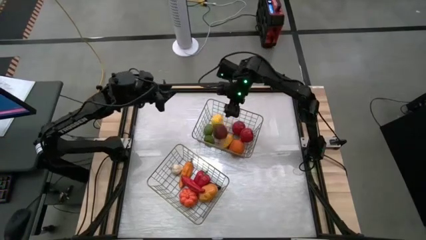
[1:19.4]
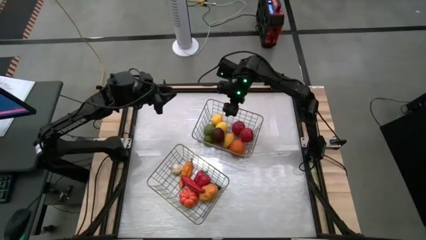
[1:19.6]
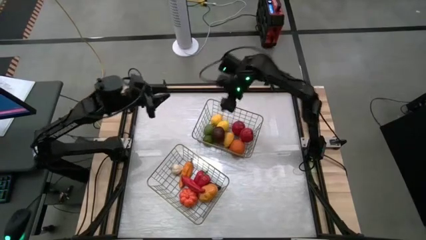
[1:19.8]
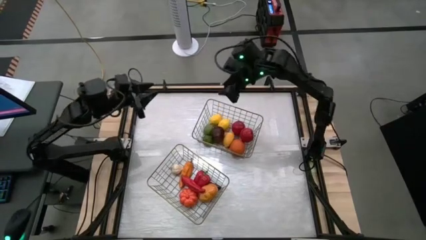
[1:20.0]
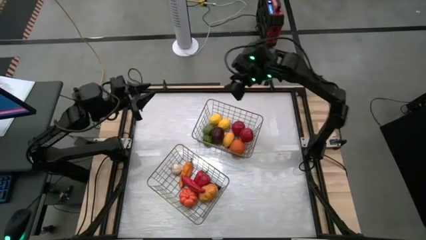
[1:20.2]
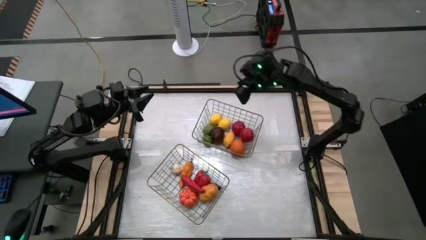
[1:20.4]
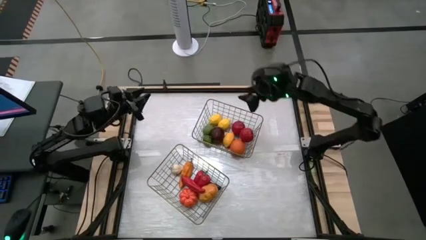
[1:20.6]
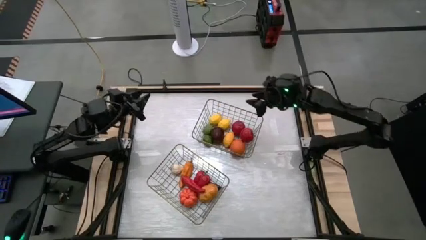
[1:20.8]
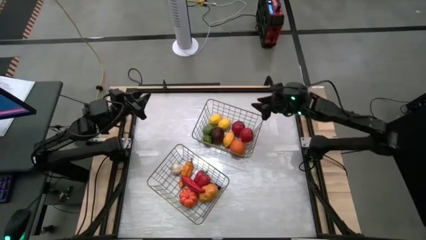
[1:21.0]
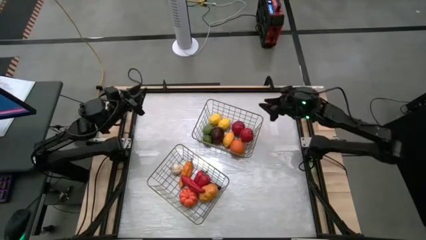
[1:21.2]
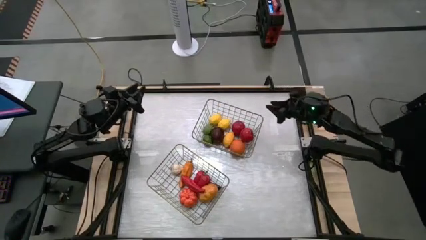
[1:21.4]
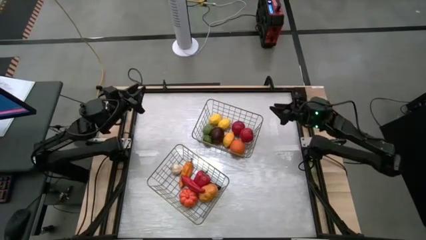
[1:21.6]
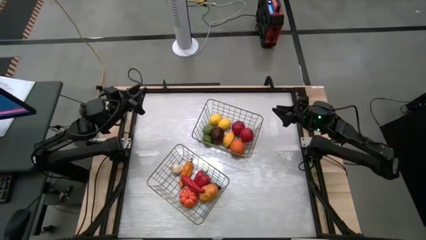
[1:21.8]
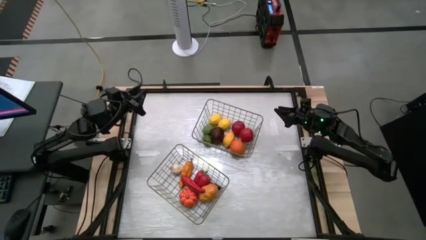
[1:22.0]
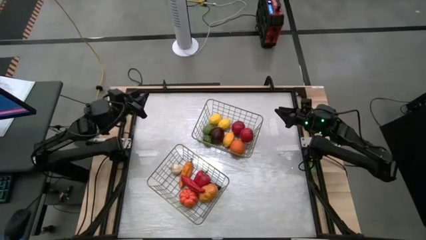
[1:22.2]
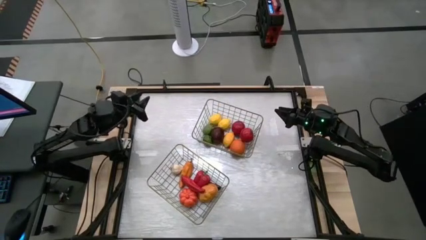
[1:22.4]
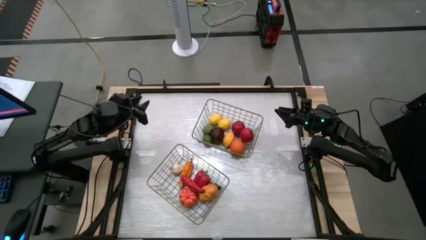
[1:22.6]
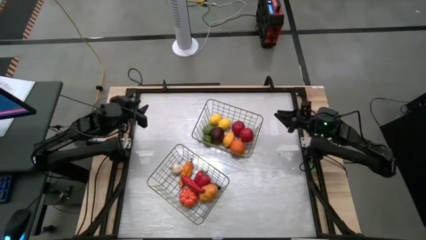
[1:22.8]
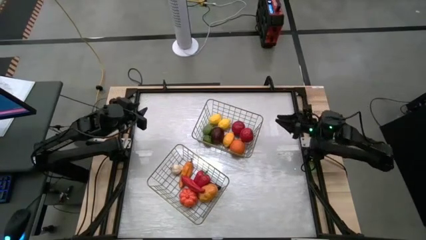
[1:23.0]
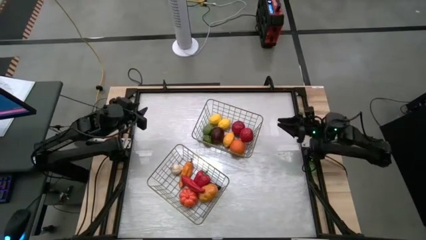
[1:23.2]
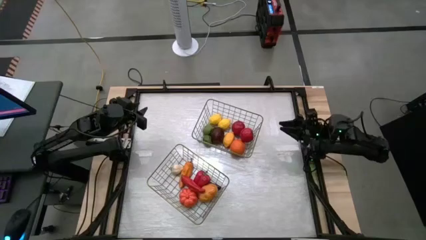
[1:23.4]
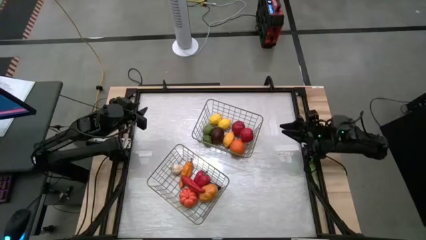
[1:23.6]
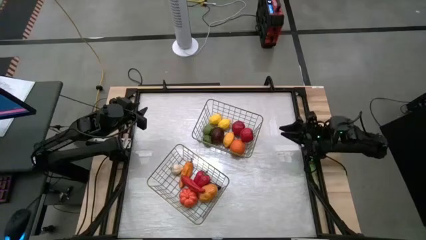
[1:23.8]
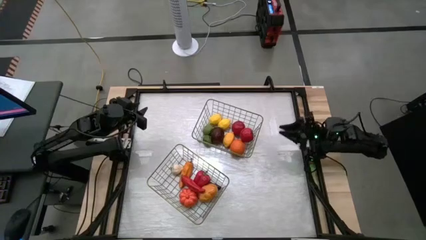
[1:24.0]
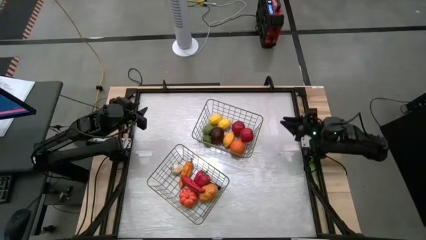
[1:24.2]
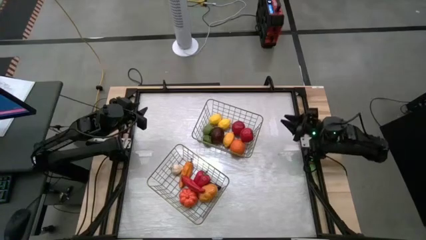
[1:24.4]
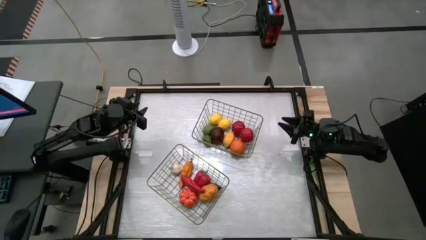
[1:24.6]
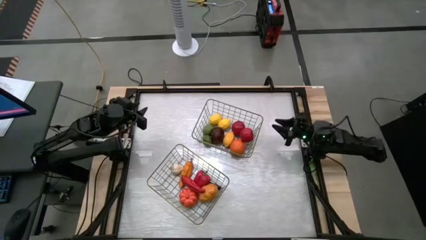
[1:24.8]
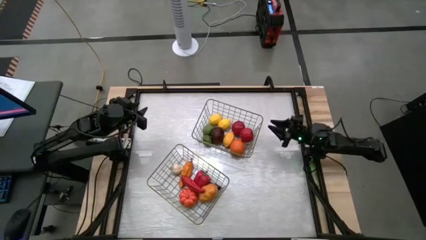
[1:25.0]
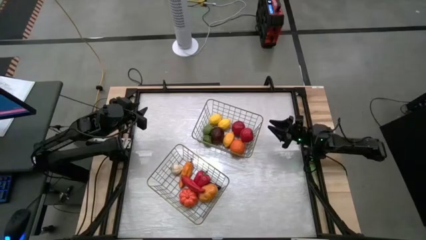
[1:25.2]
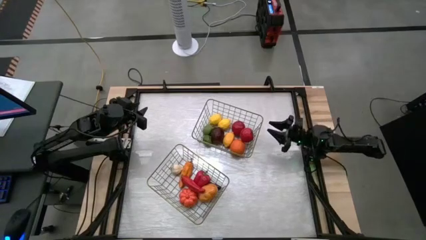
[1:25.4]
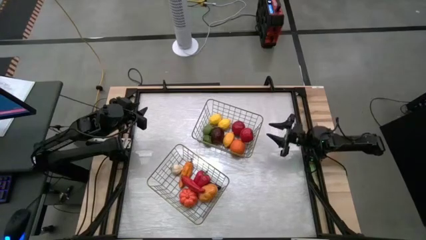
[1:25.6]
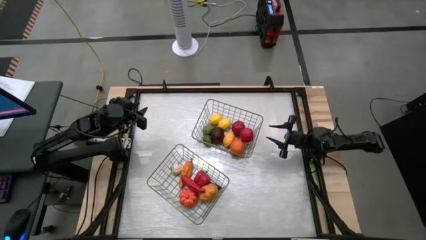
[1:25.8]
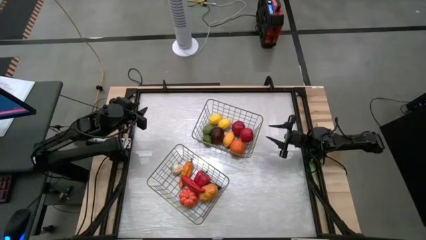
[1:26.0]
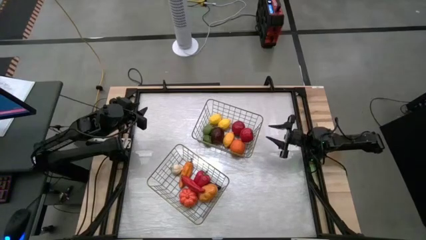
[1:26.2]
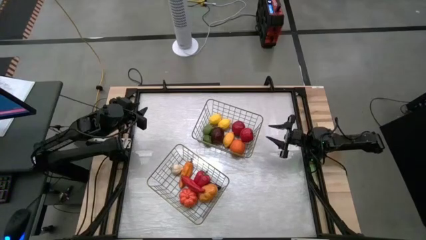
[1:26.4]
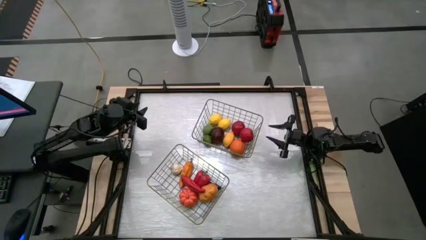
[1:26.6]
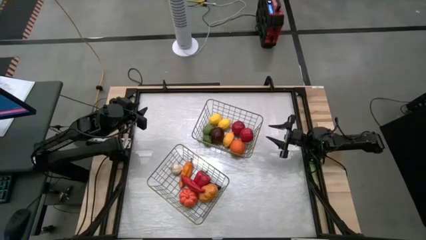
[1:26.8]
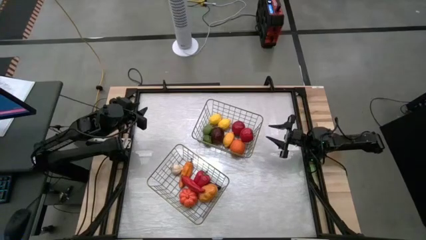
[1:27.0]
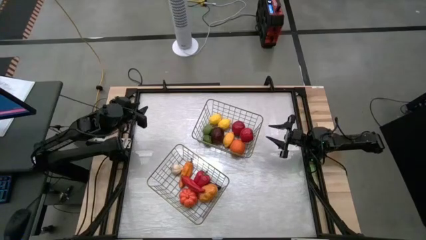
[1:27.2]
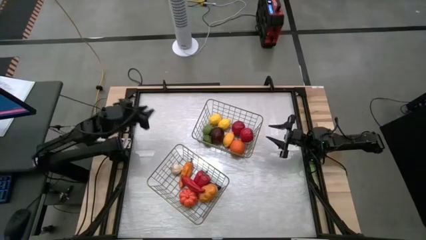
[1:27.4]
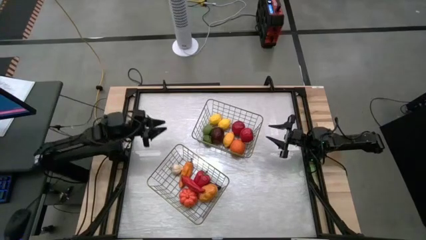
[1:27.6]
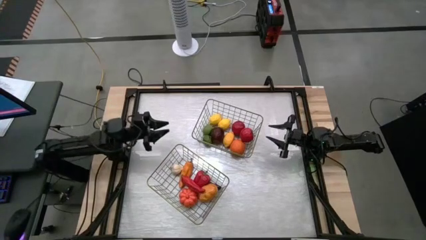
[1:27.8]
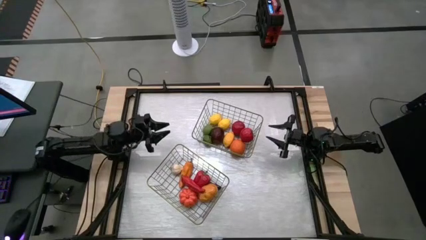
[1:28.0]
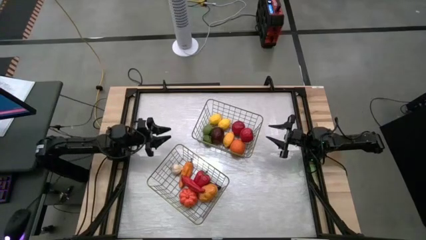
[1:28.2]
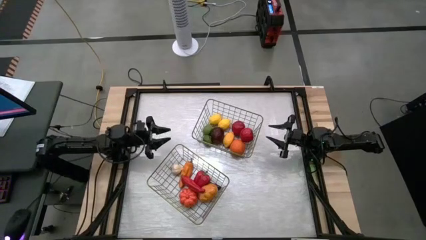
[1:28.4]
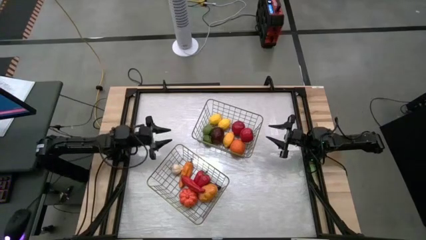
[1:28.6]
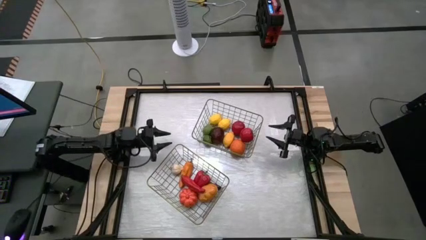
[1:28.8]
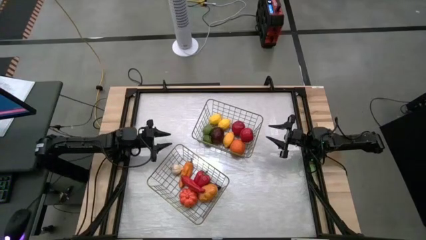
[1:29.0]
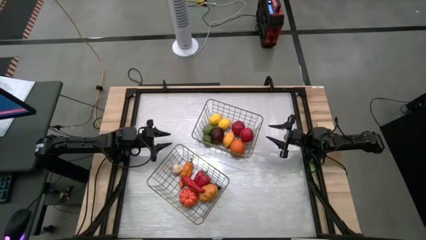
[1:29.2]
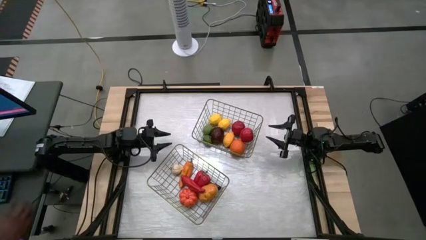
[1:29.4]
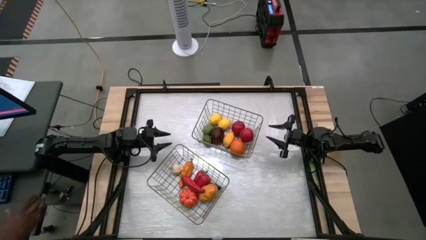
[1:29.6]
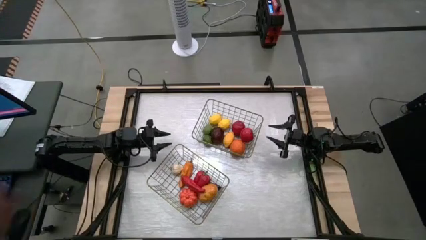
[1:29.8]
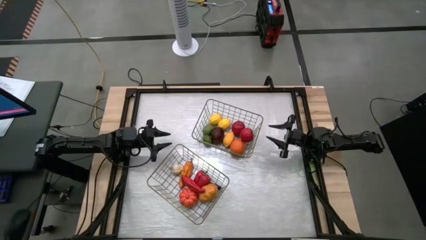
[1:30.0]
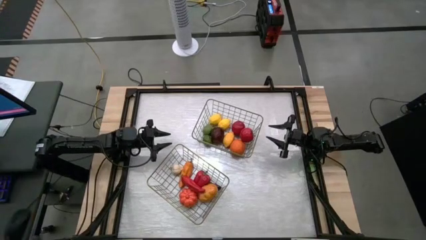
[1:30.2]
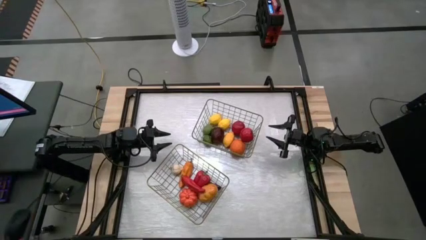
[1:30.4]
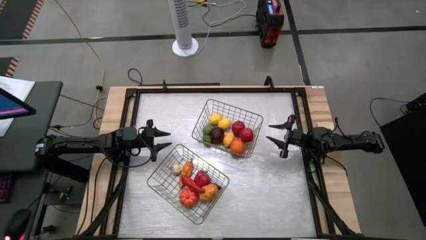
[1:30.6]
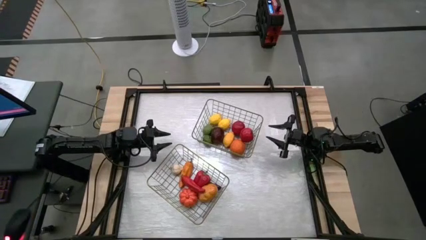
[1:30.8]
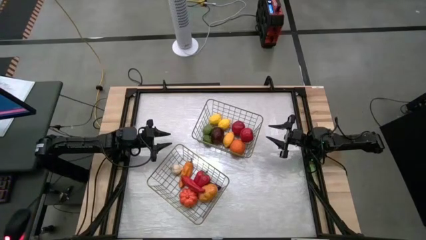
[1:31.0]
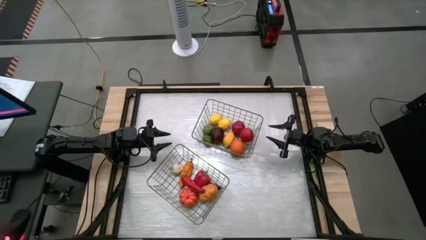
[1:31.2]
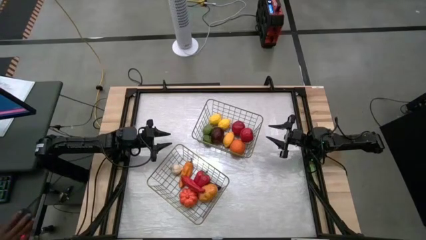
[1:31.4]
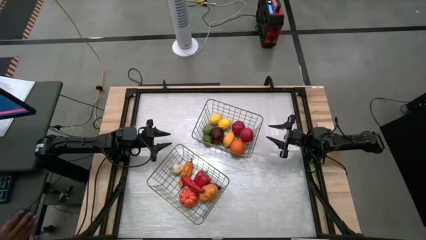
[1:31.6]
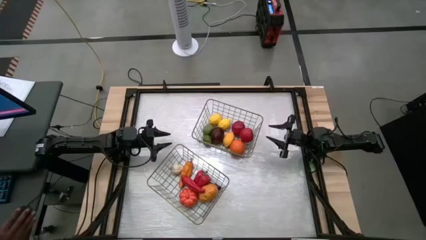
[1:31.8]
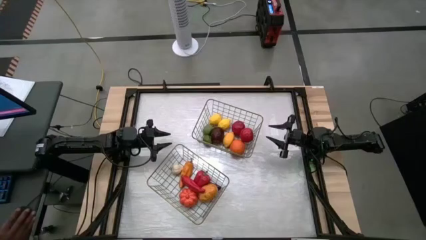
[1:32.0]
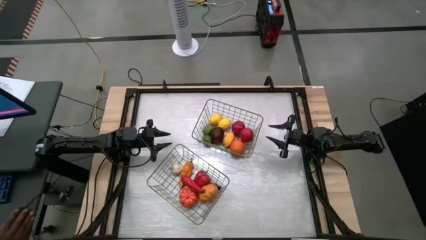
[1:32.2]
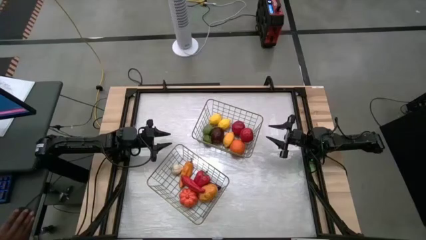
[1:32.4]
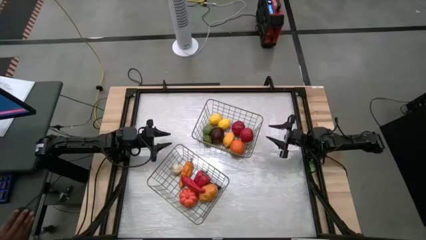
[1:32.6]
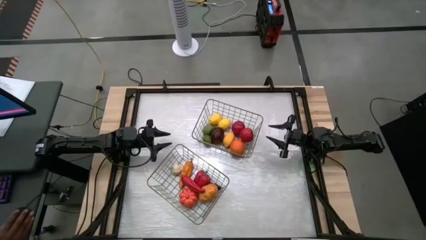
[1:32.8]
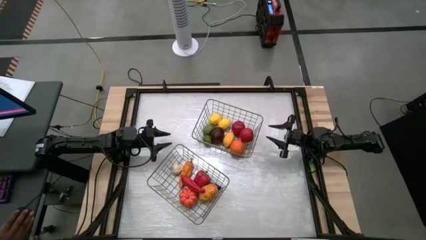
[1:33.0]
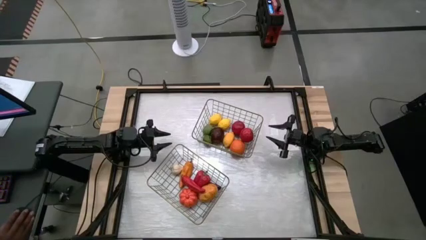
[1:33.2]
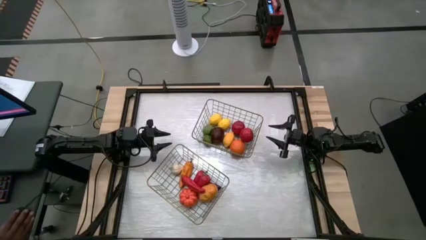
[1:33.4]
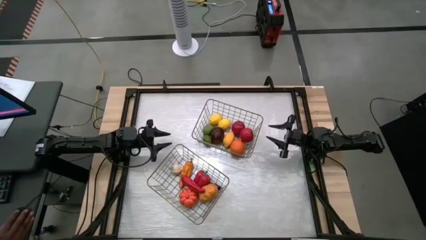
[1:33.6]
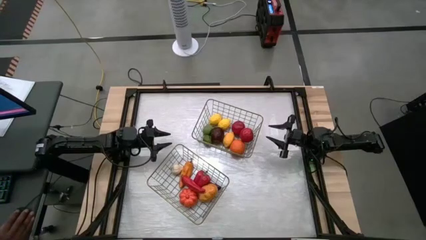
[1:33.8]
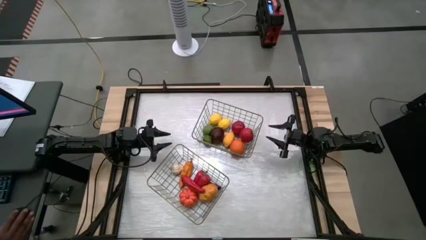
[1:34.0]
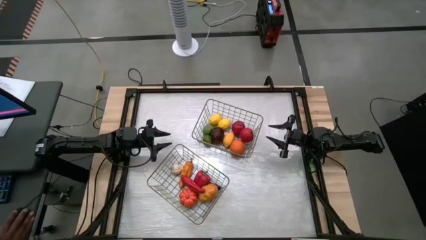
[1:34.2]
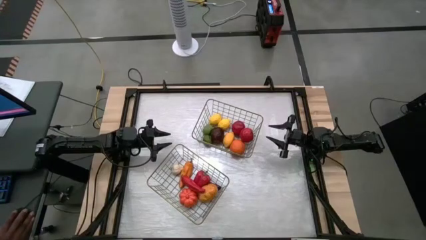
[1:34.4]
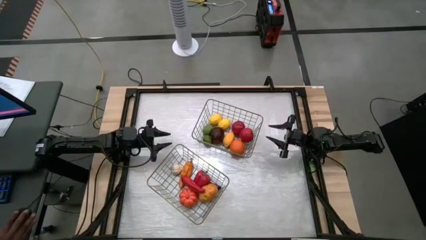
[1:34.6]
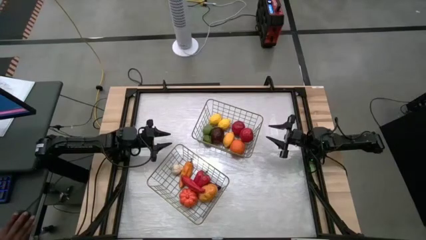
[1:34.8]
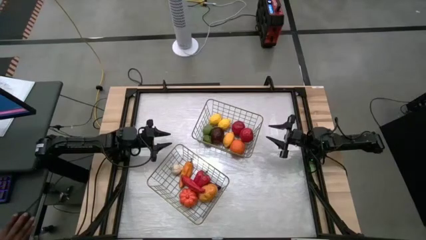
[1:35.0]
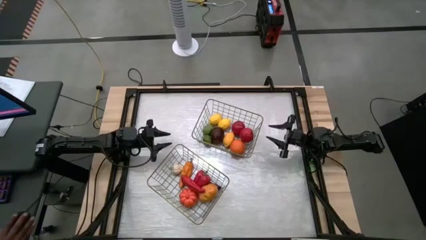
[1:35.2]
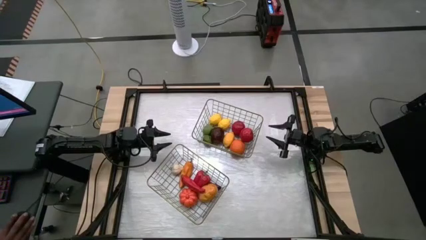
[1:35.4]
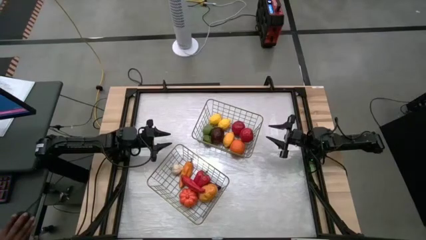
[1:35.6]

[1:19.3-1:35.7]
Task: Sort produce into baskets
Return to Home Position

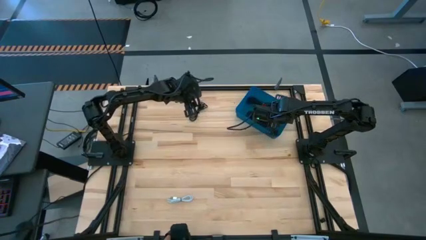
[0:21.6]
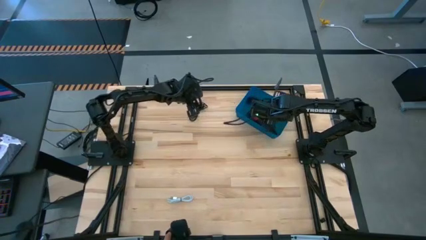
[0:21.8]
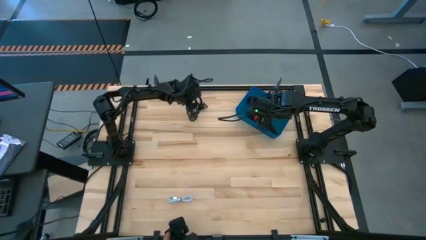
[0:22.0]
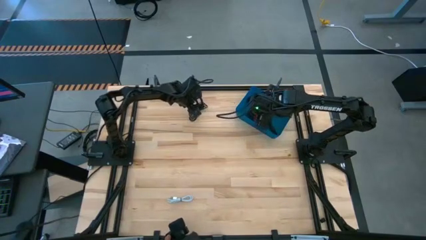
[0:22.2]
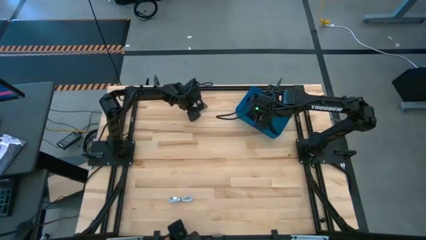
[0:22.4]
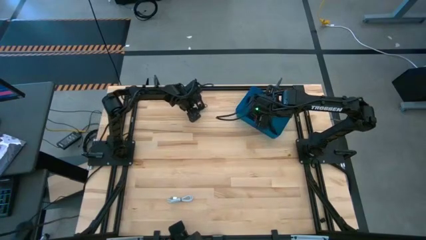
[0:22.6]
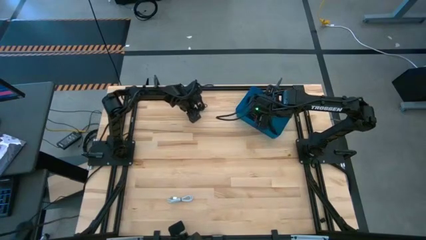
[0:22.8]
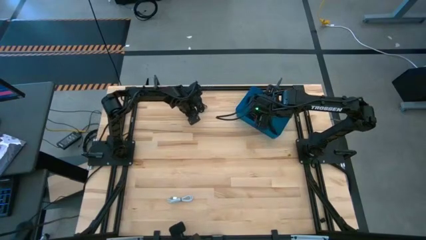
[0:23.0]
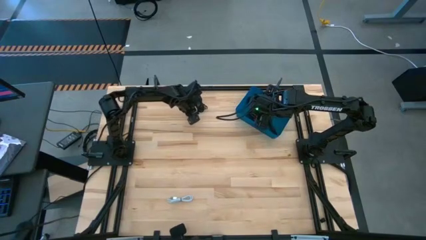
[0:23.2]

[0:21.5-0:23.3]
Task: Pick and place USB-C Cables
Put the black charger cable into the bin
